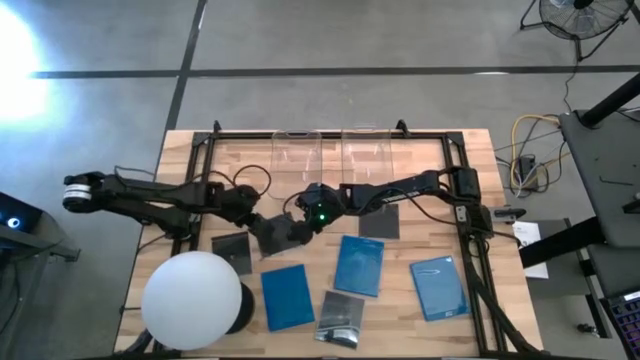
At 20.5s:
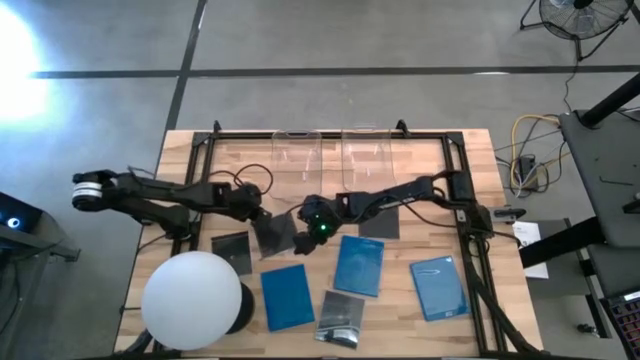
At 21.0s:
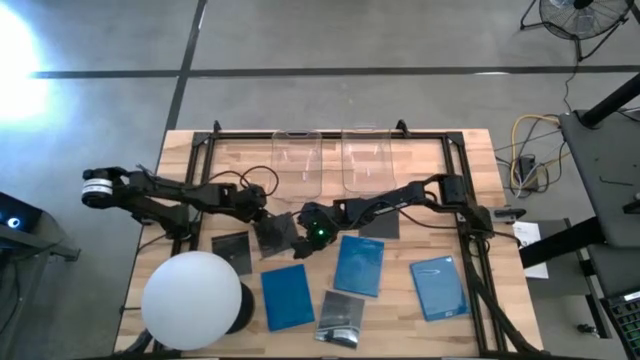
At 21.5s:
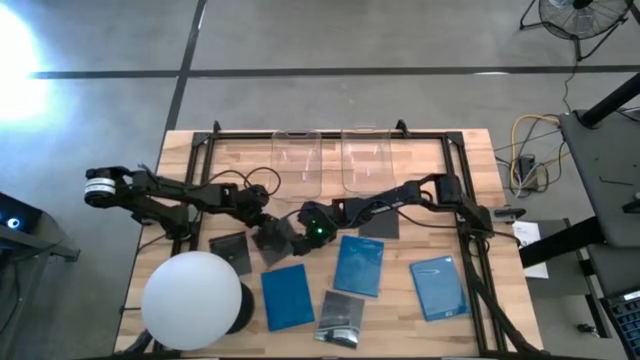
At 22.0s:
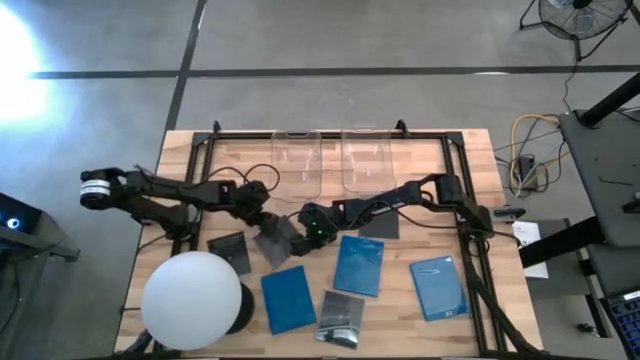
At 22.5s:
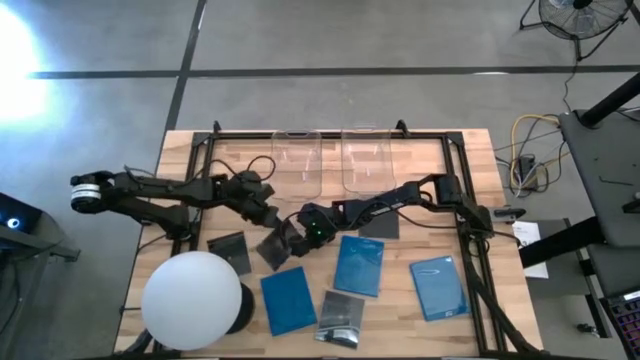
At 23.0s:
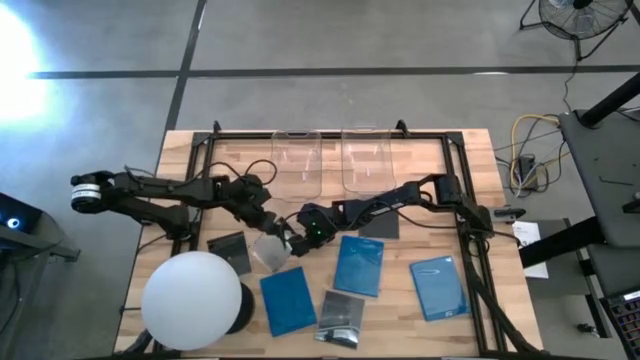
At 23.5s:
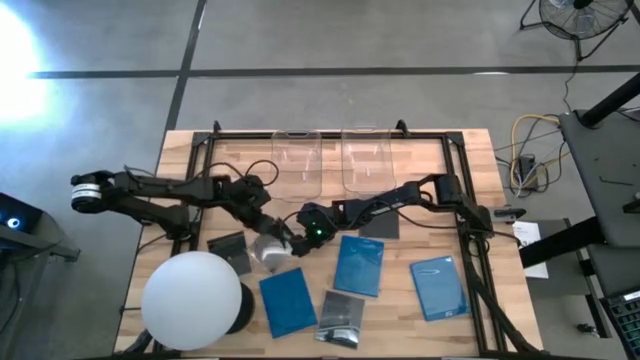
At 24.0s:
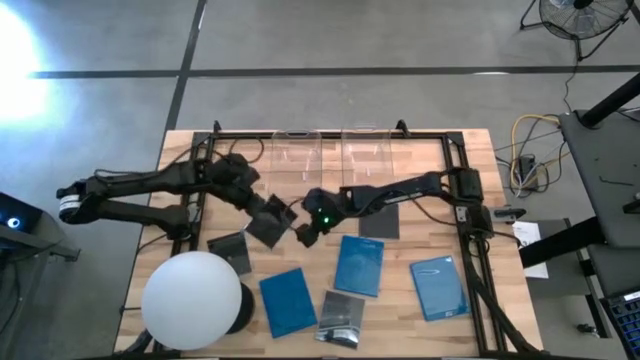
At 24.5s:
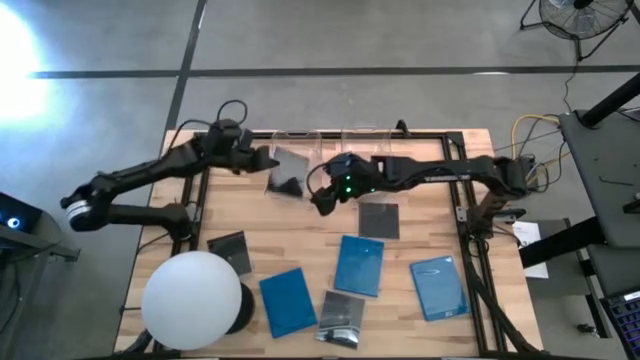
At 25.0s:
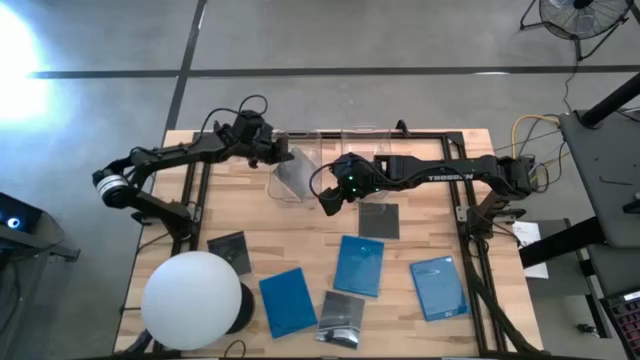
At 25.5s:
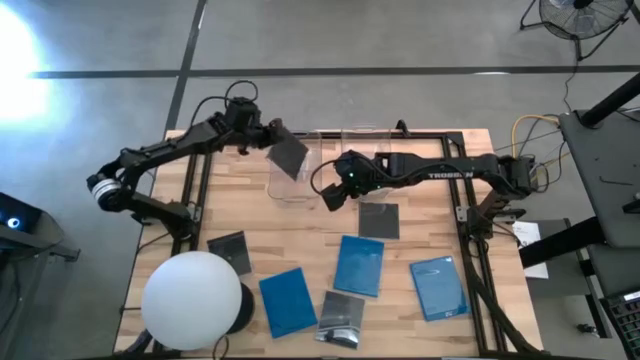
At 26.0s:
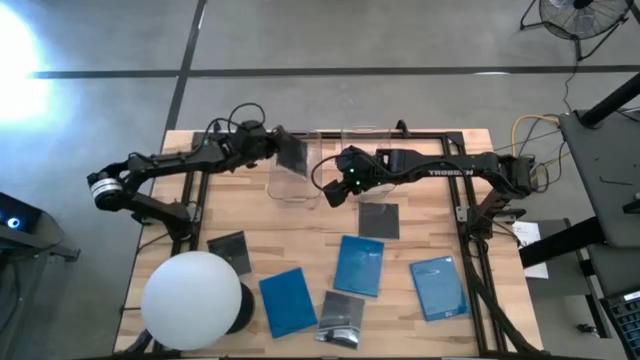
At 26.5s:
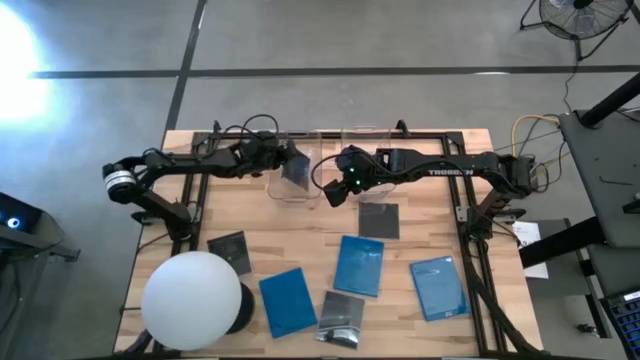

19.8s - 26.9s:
Task: Pick & place jewel cases by type
Put the black cd case into the left transparent bin

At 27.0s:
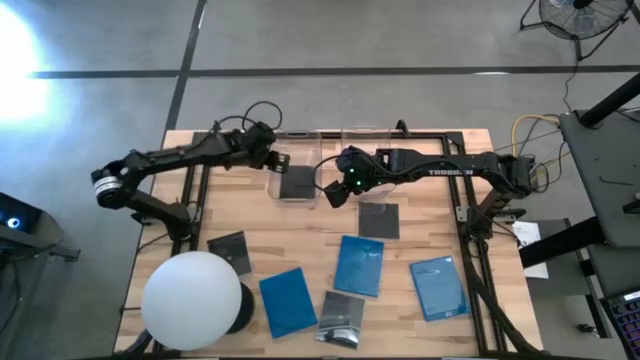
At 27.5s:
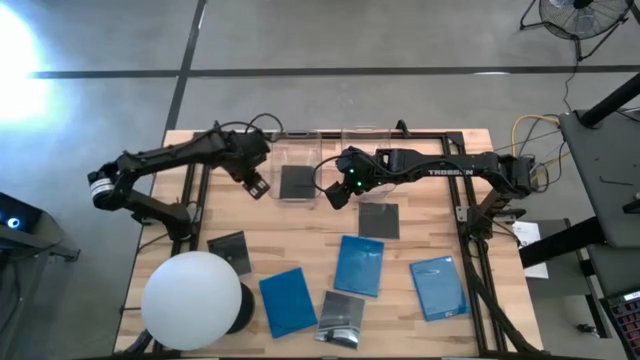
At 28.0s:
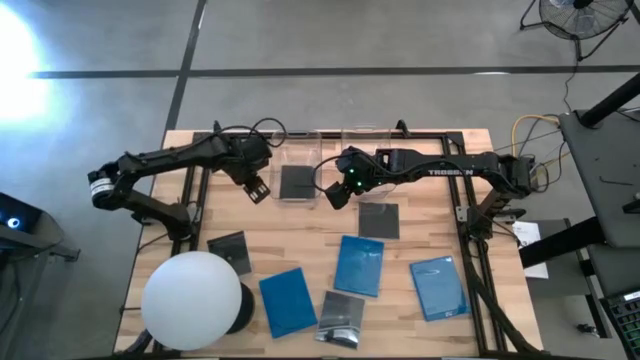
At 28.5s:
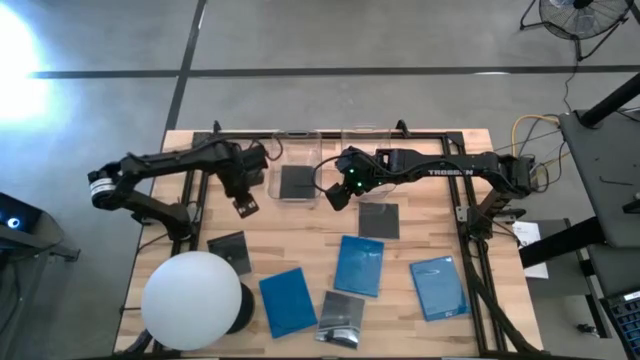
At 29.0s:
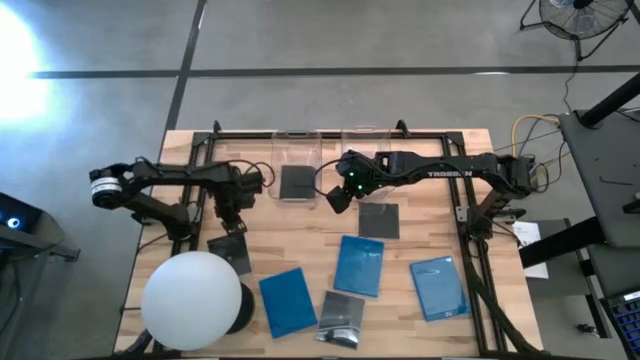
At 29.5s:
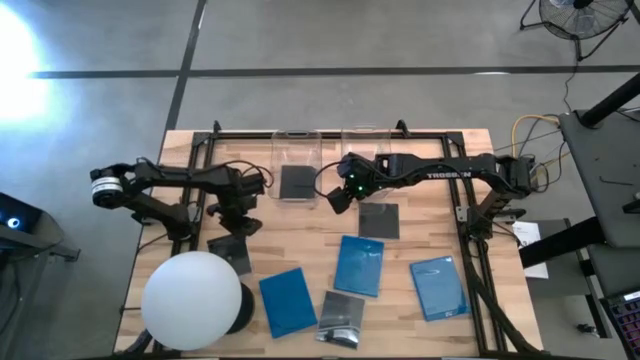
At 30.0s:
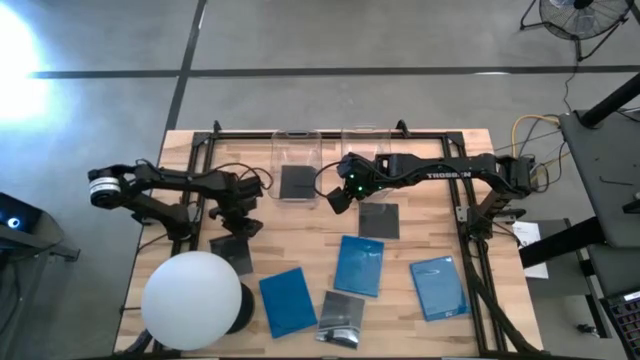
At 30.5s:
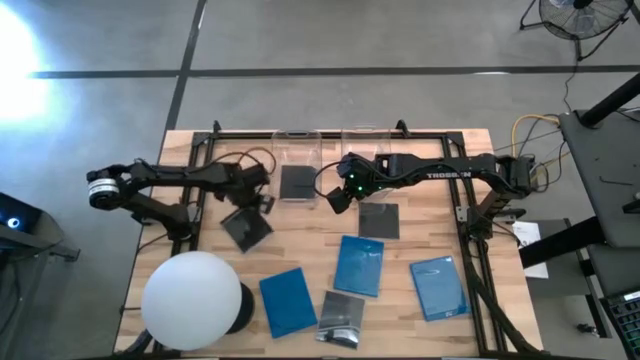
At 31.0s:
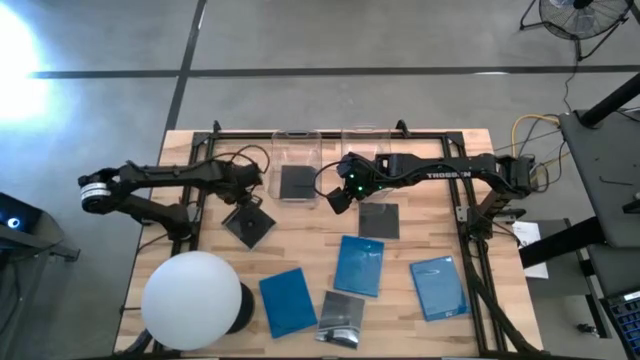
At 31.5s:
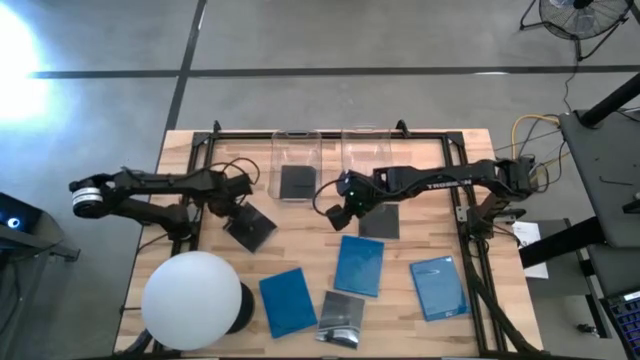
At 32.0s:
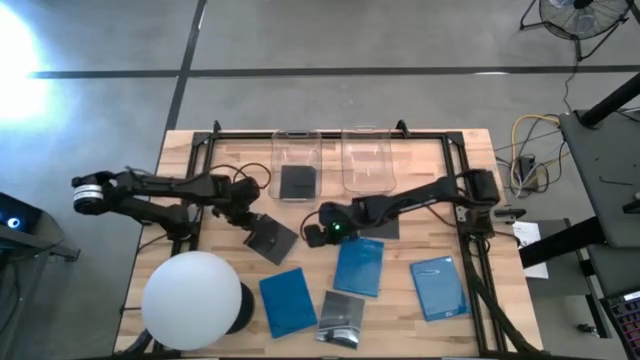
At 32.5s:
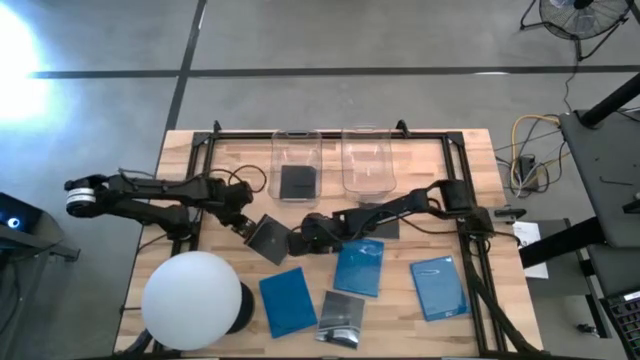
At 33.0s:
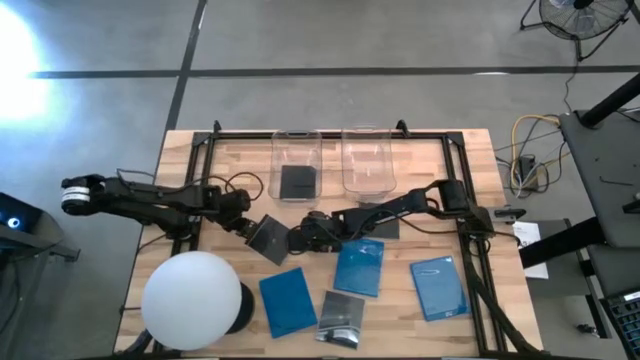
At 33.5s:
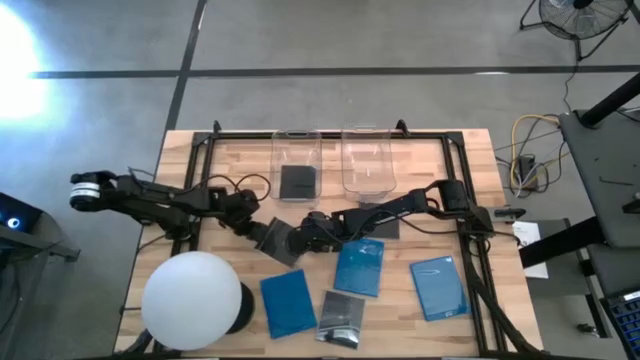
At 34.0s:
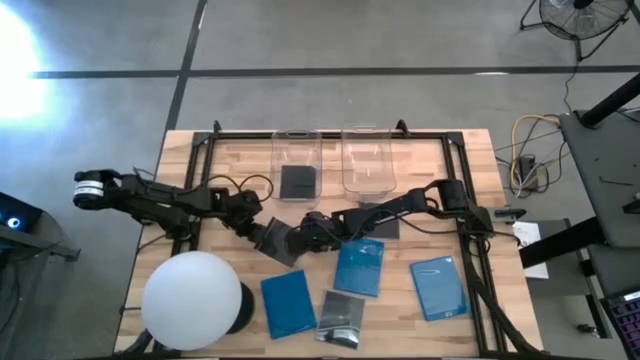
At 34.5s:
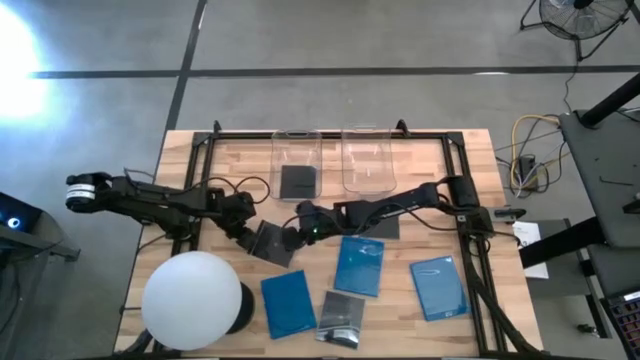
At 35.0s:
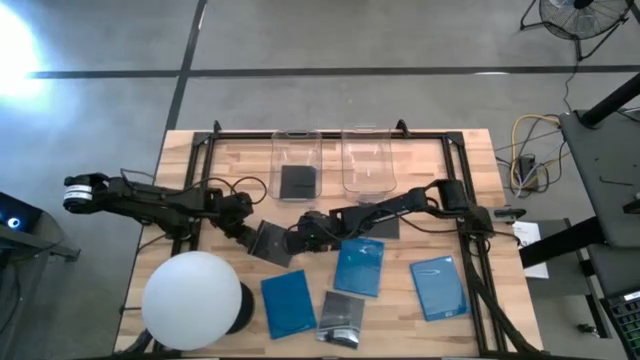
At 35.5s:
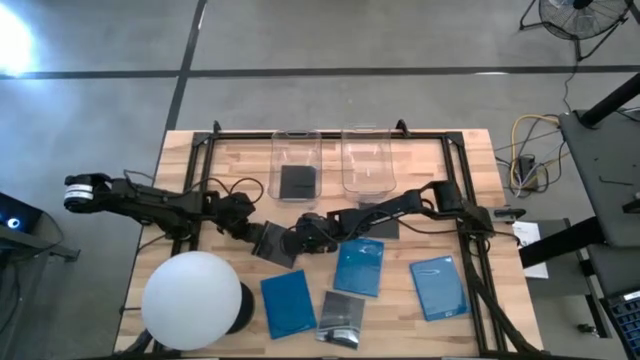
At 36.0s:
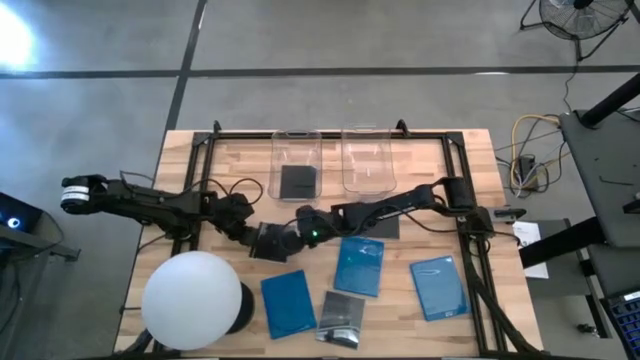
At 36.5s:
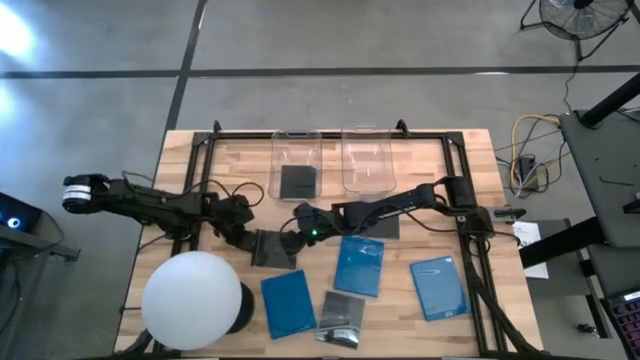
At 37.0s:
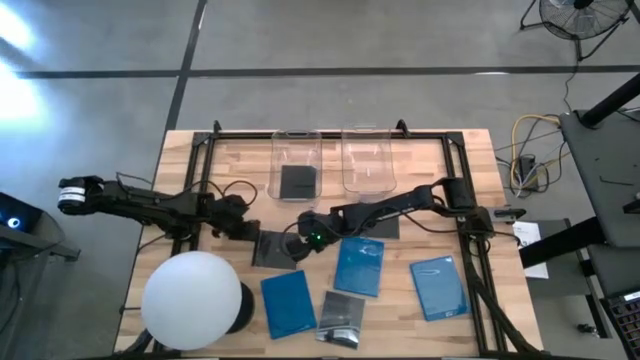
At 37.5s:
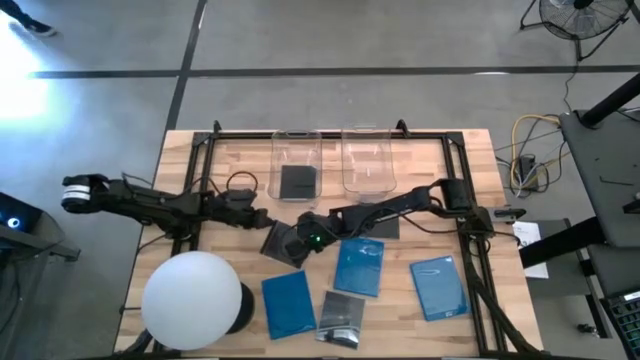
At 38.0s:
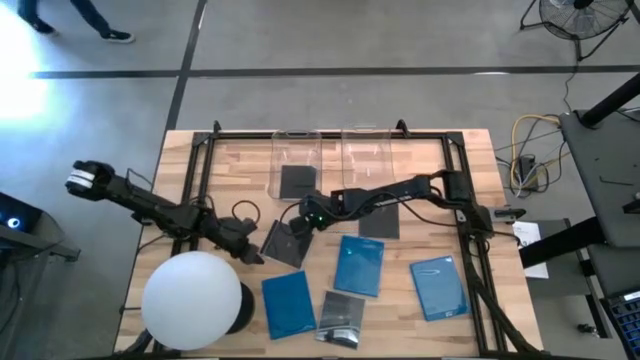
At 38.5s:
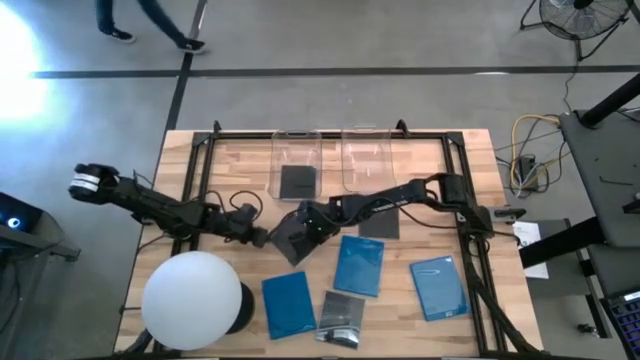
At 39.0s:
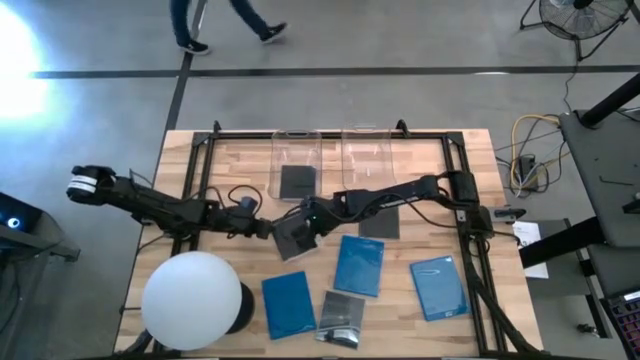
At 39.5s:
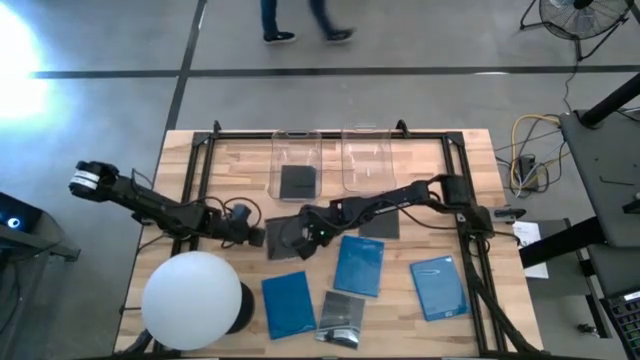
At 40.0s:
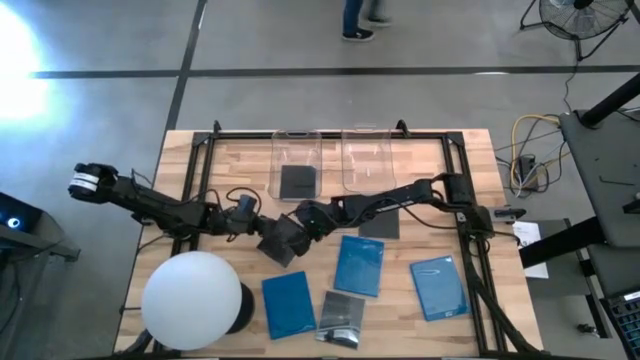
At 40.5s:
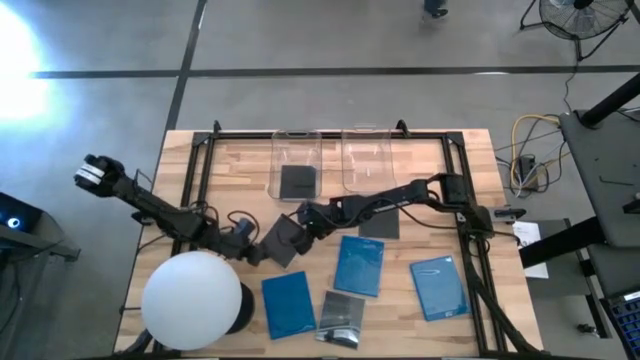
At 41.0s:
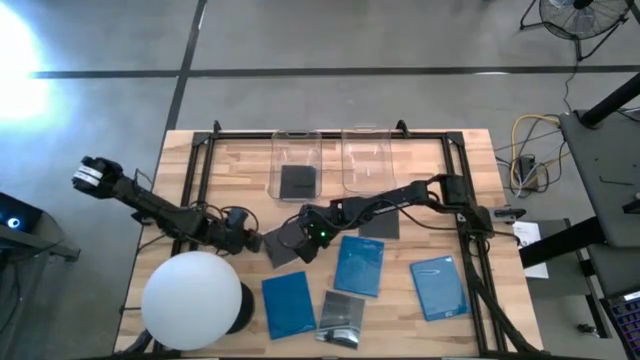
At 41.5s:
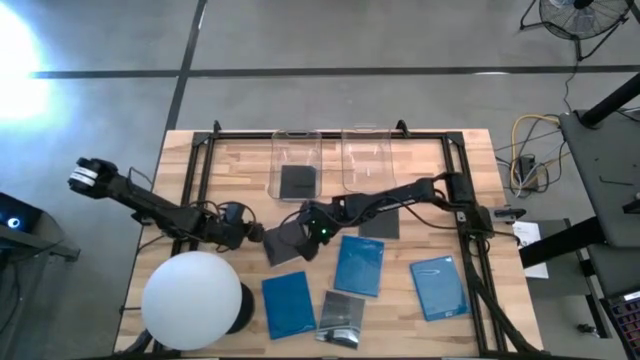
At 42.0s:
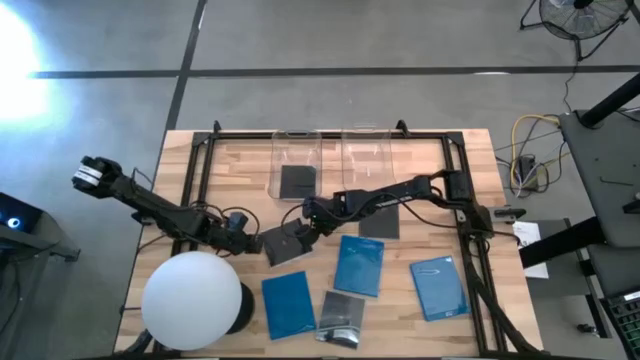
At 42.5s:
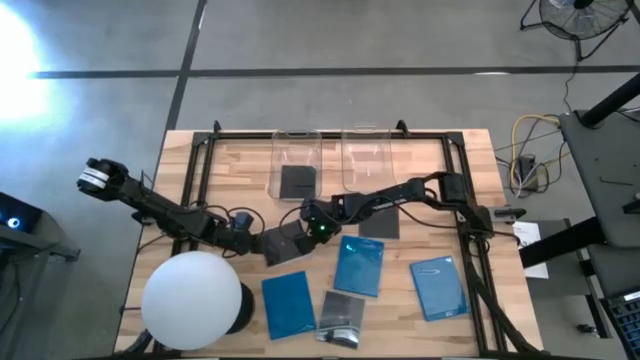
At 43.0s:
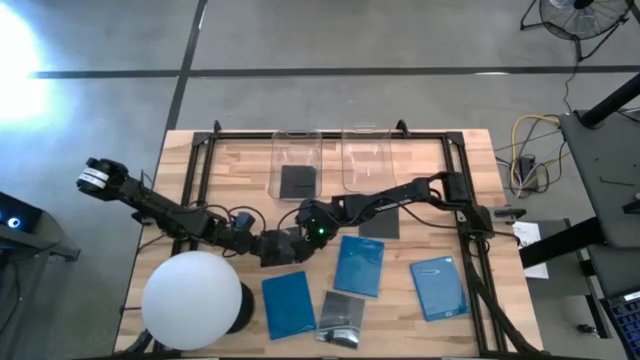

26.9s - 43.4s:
Stack the black CD case into the left transparent bin
